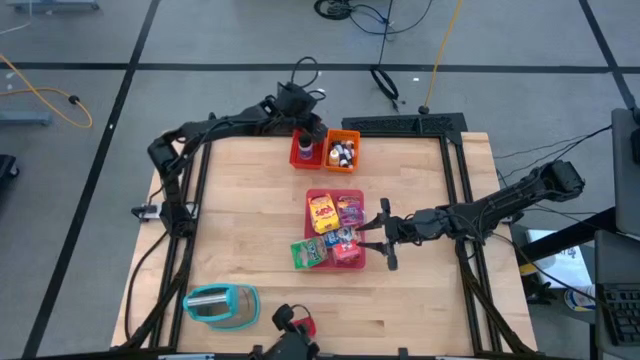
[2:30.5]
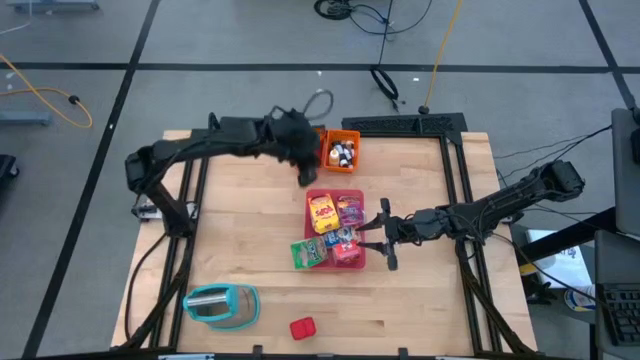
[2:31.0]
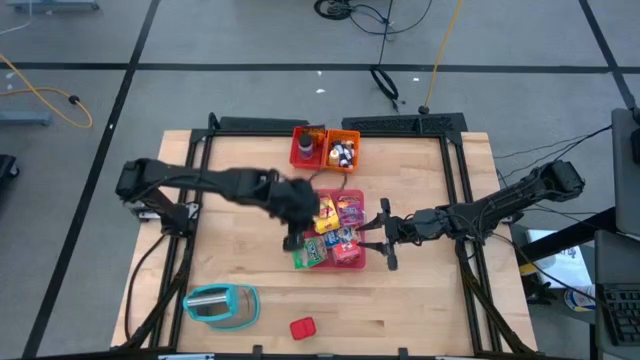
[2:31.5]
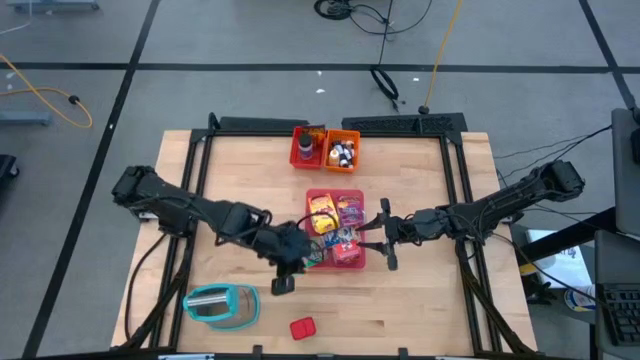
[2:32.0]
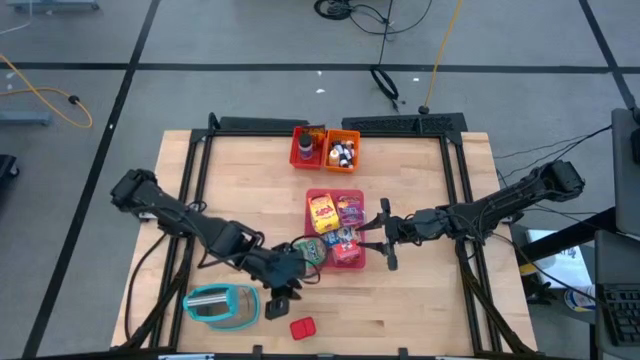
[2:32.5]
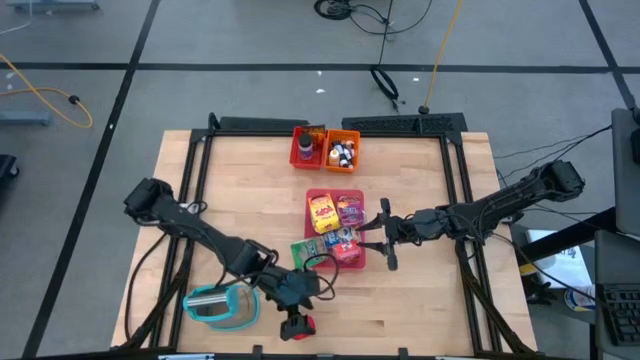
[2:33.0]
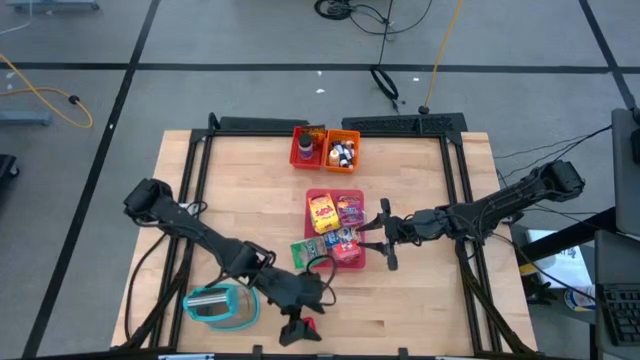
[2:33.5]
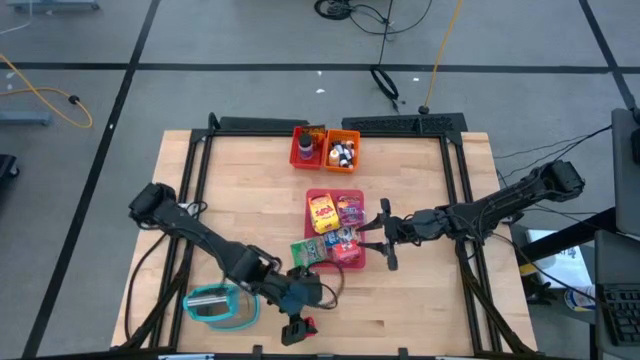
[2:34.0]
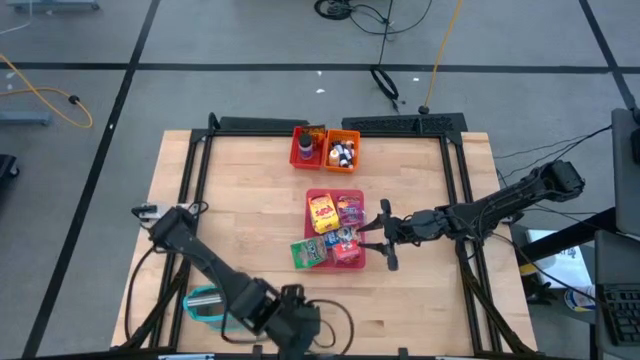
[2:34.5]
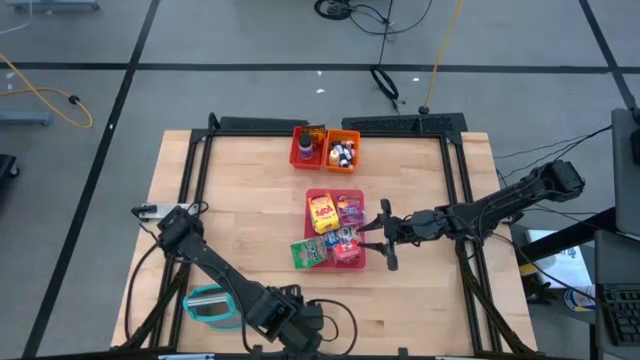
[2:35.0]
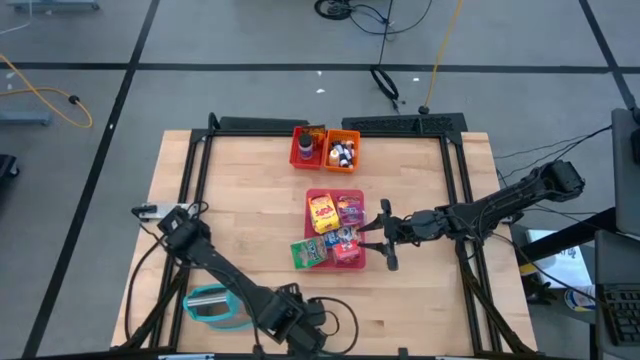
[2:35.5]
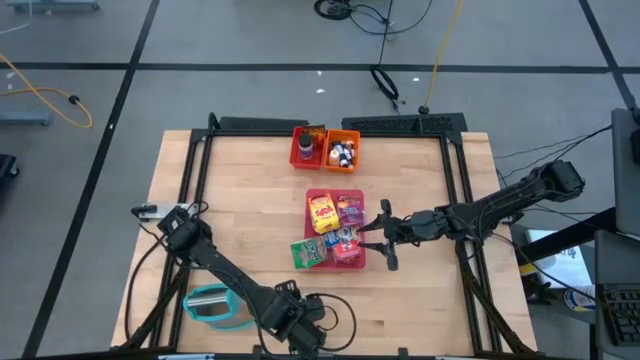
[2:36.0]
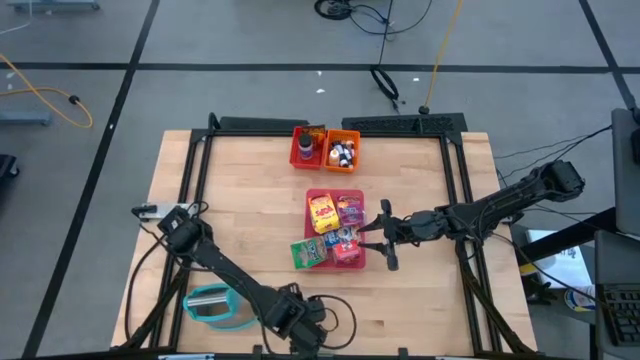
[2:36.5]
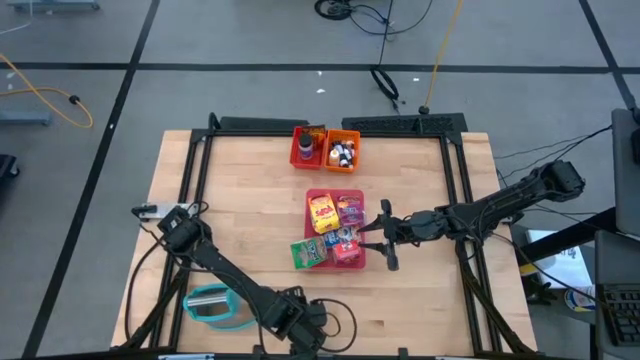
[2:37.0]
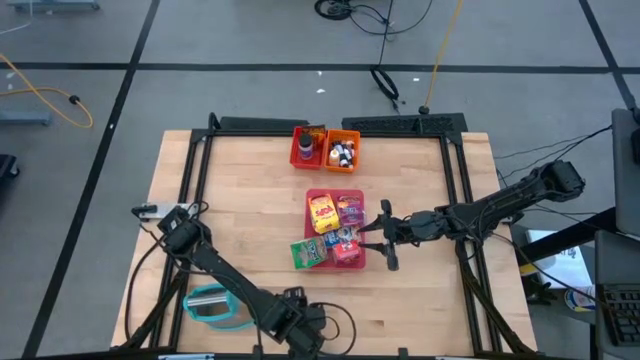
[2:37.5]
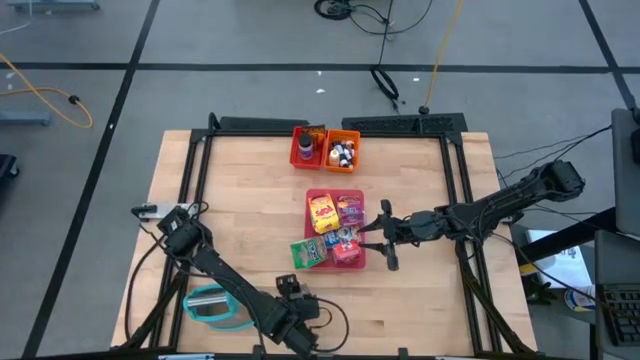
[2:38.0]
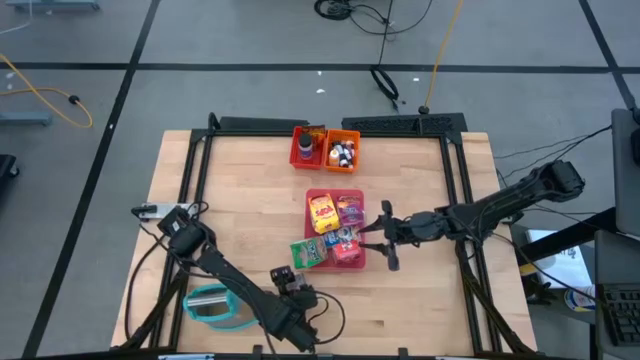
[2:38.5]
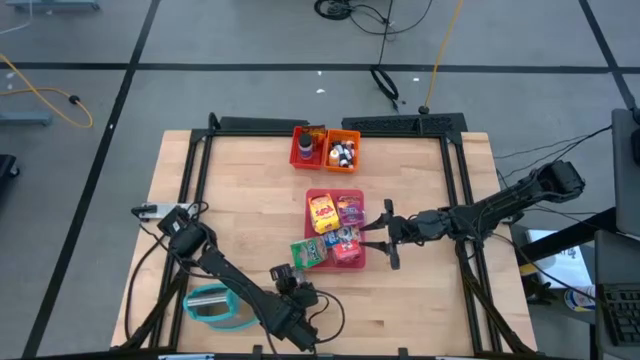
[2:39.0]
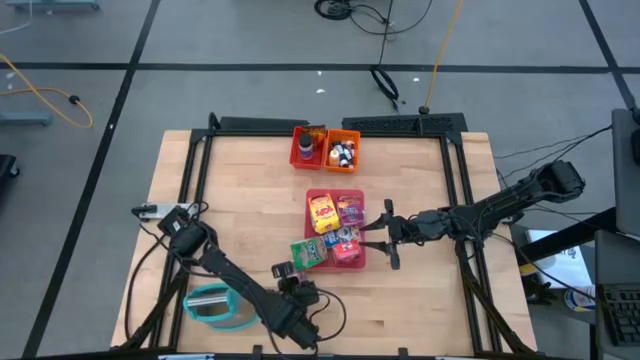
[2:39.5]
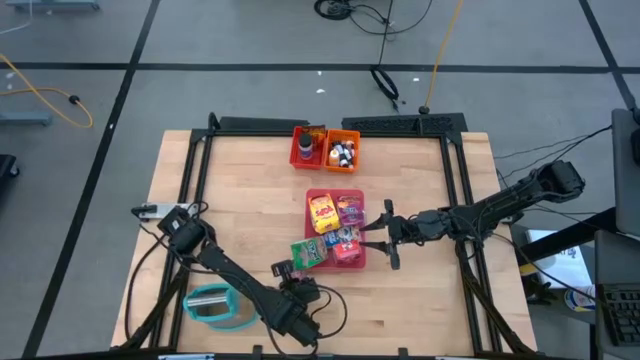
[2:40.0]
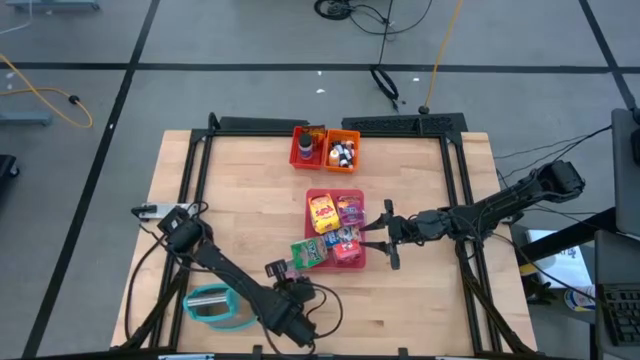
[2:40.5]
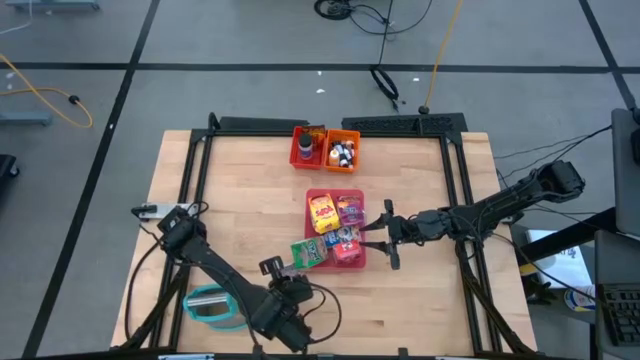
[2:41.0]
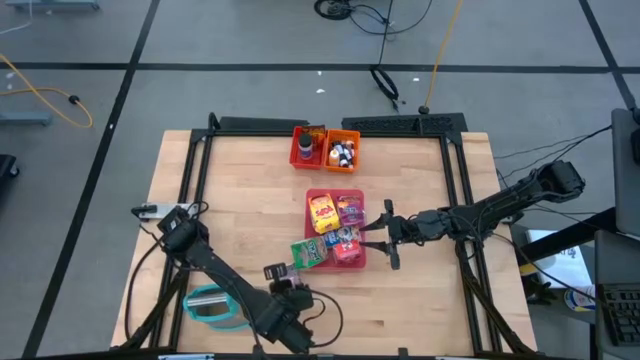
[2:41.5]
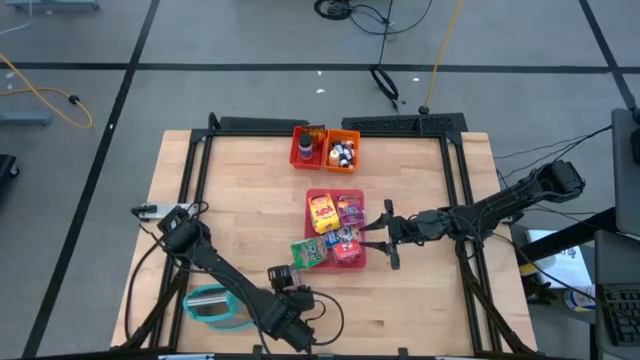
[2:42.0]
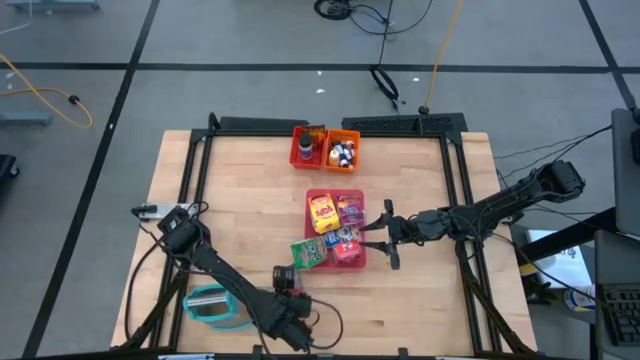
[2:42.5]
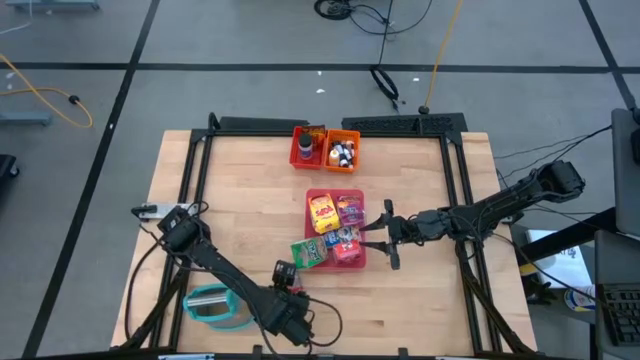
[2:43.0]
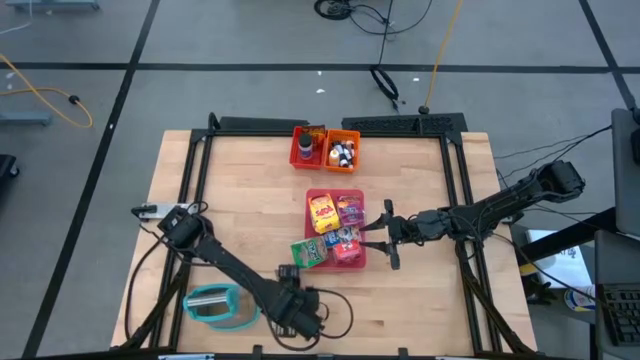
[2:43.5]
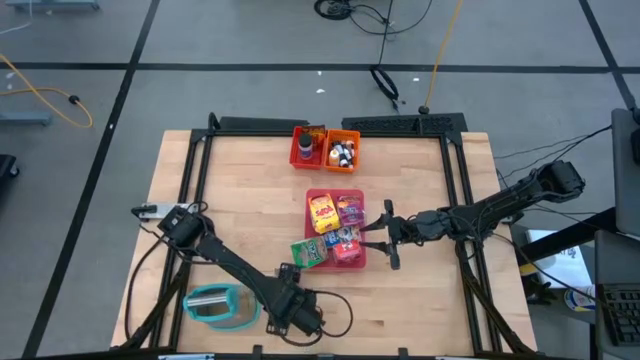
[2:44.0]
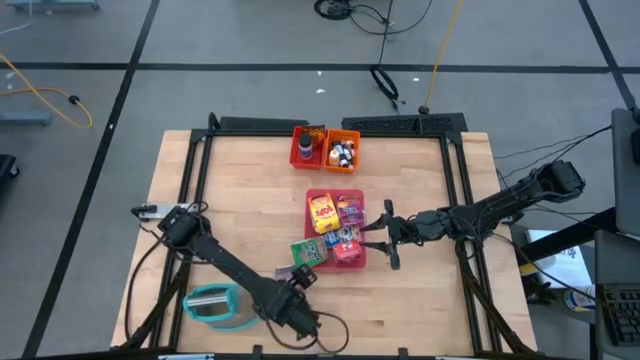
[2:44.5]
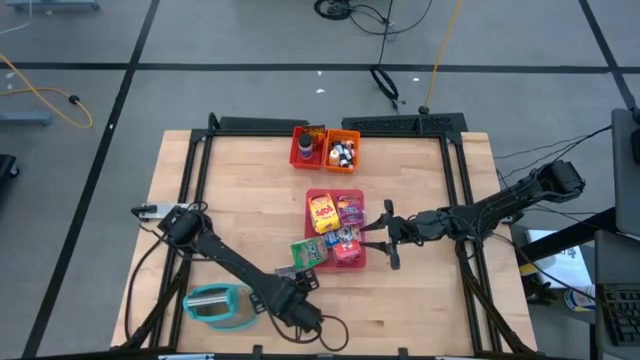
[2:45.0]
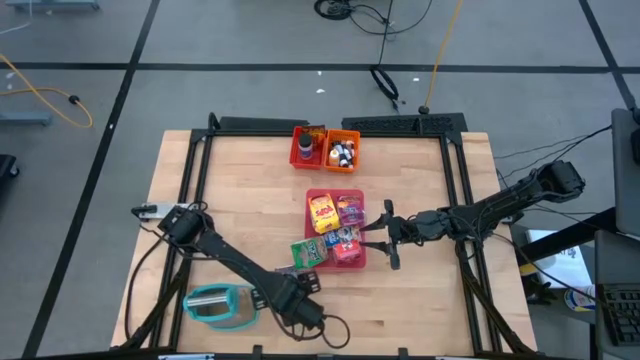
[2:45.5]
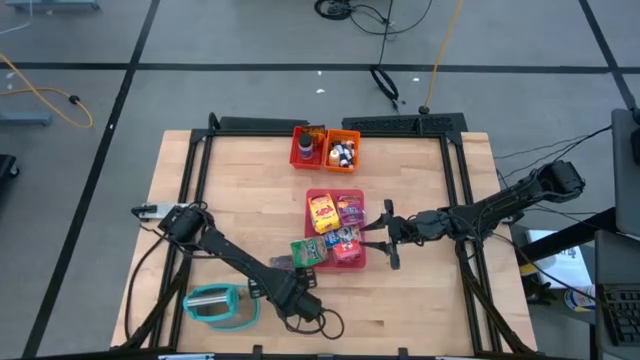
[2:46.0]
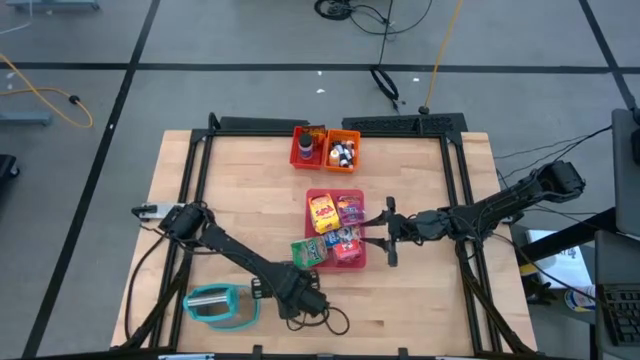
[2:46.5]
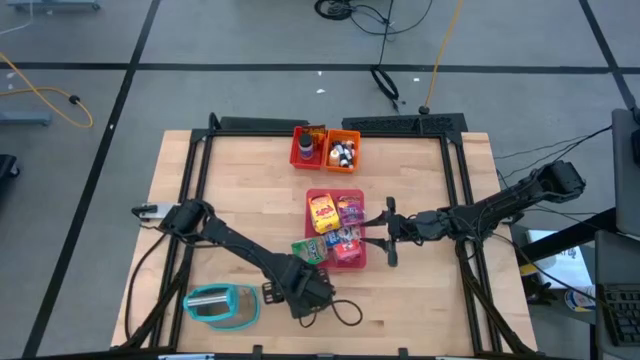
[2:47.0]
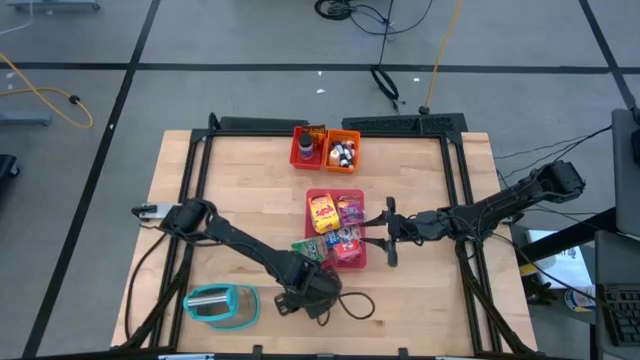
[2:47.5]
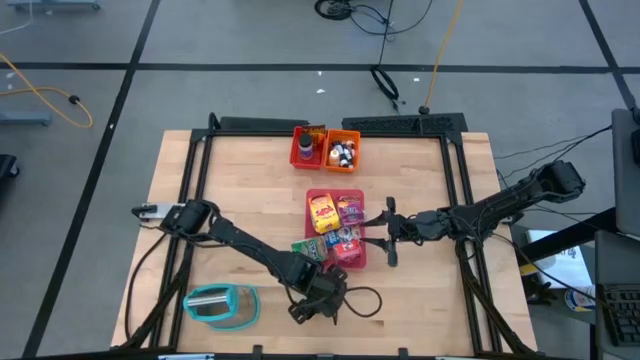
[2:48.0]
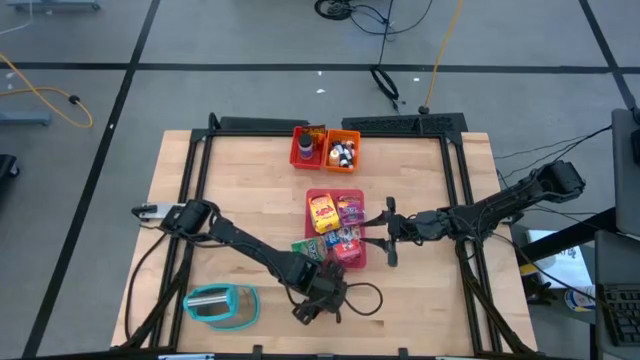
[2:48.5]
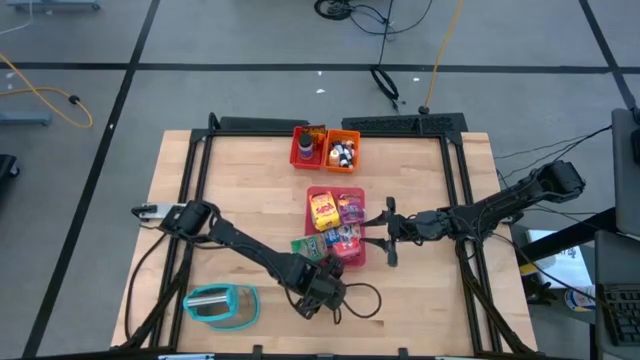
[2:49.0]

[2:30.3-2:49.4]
Task: Pick & Place Kitchen Items
Put the red seasoning can into the red basket

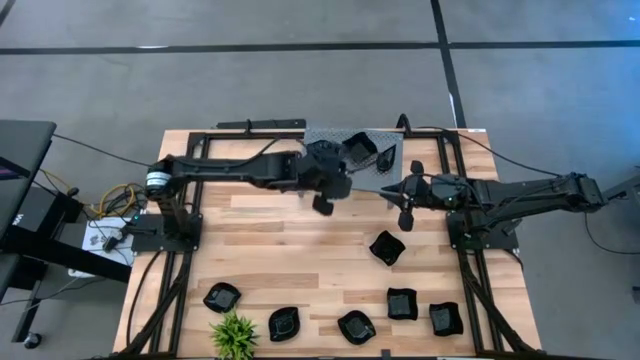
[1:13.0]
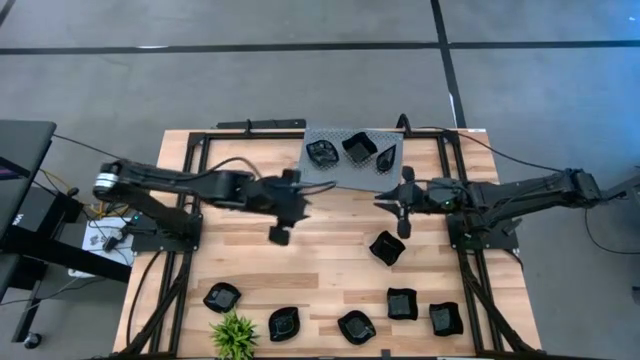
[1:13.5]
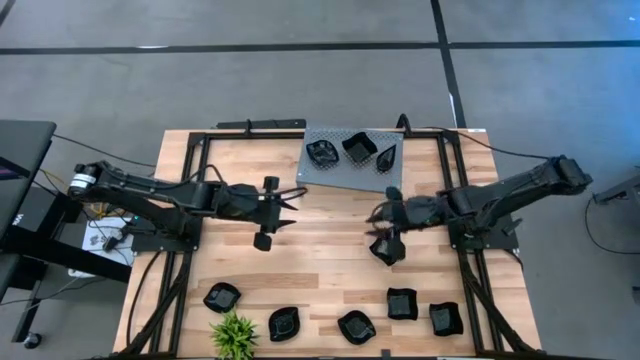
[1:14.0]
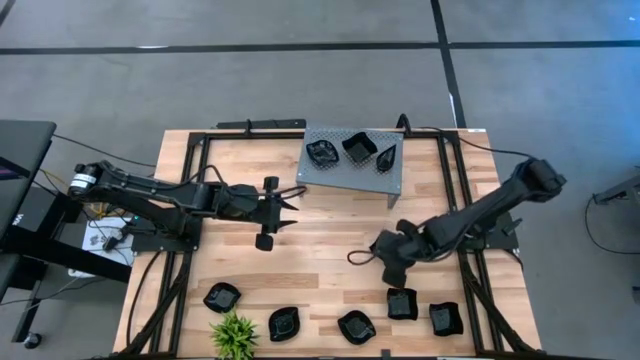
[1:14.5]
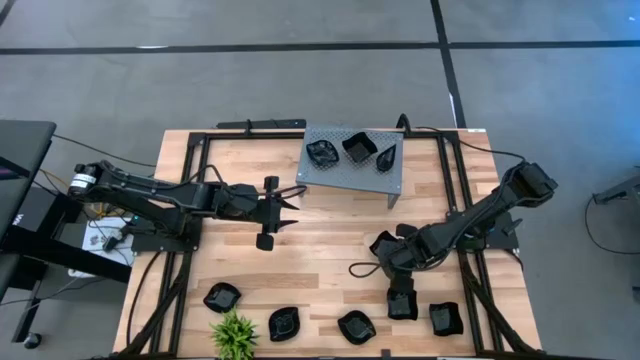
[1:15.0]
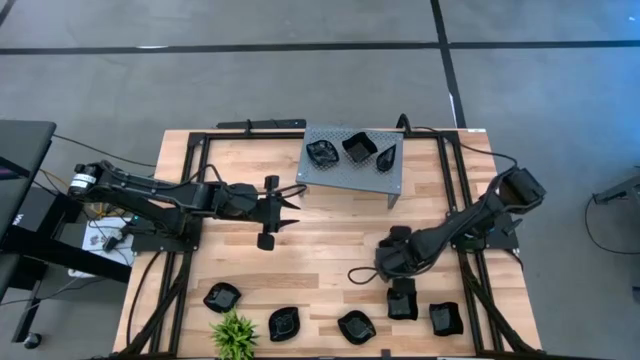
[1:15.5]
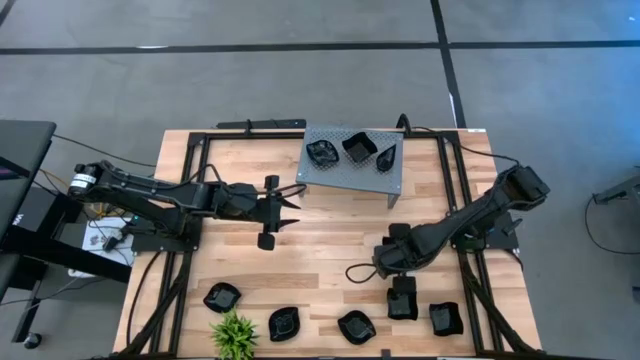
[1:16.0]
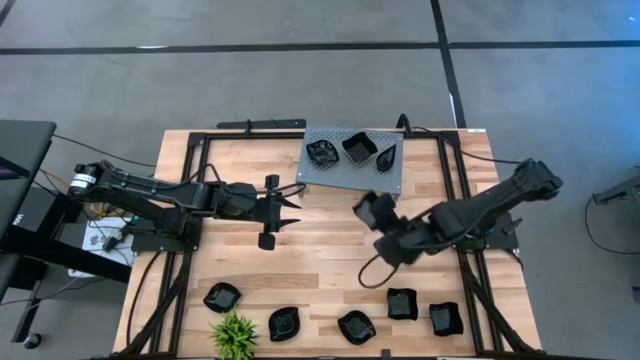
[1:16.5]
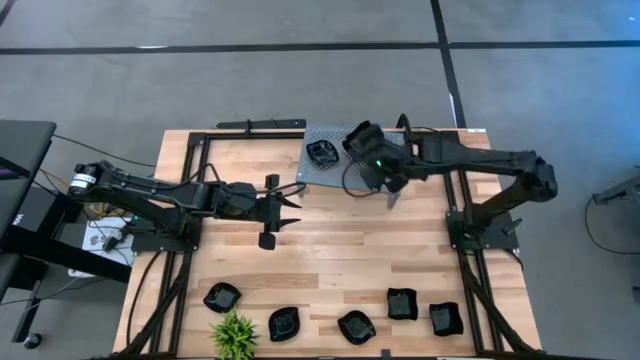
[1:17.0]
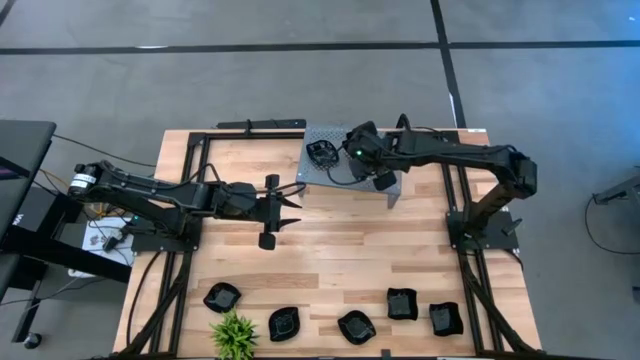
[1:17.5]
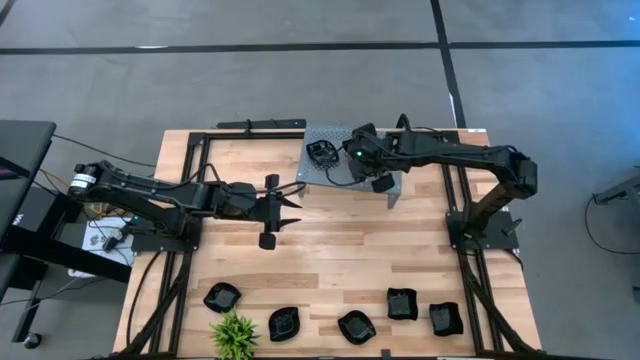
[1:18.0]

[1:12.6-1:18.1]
Task: Pick & Place Mini shaped plates
Stack the distorted square plate on the other distorted square plate on the shelf
